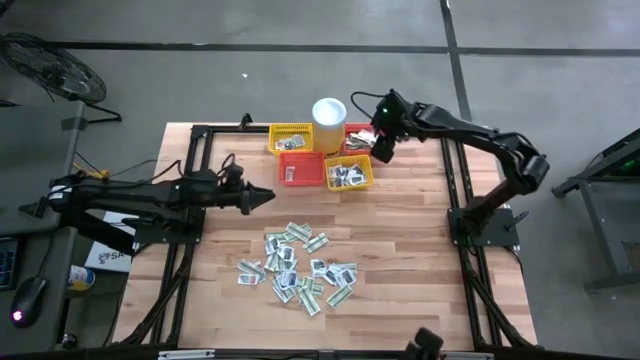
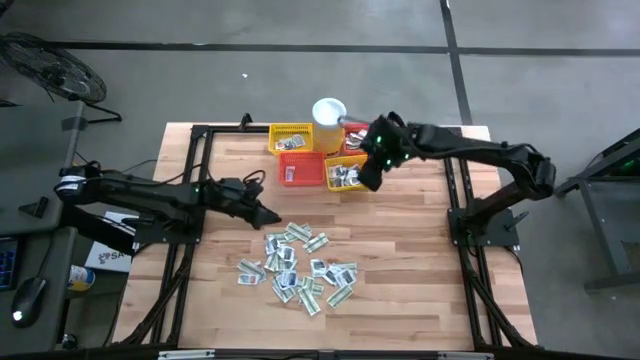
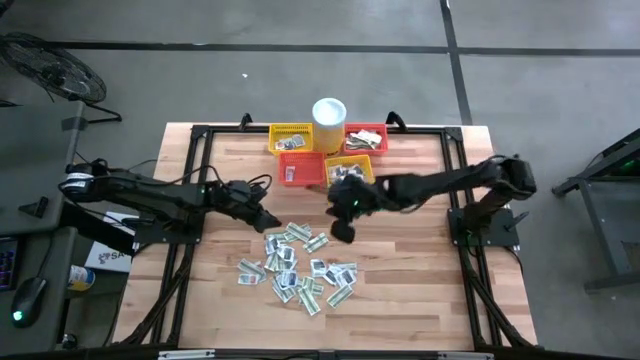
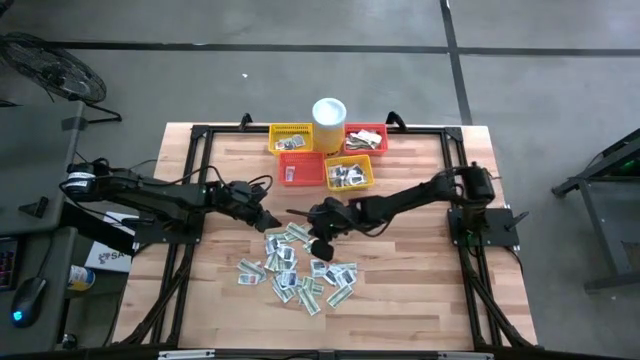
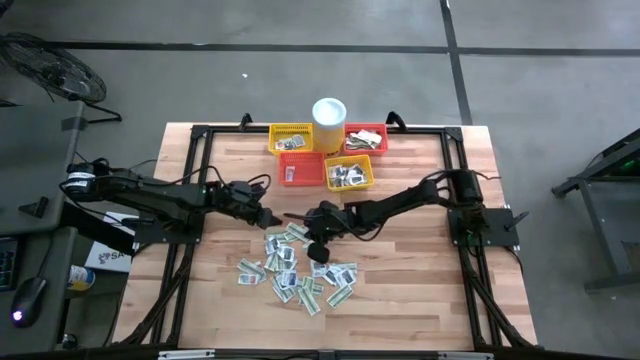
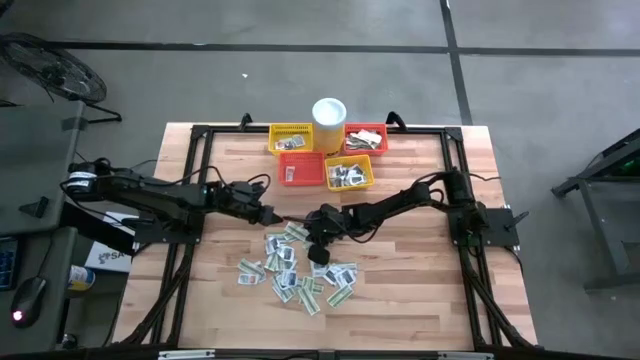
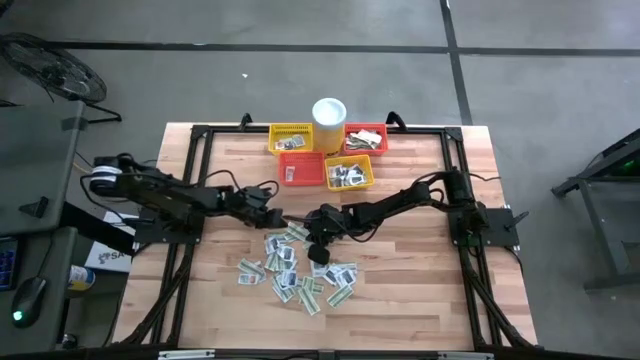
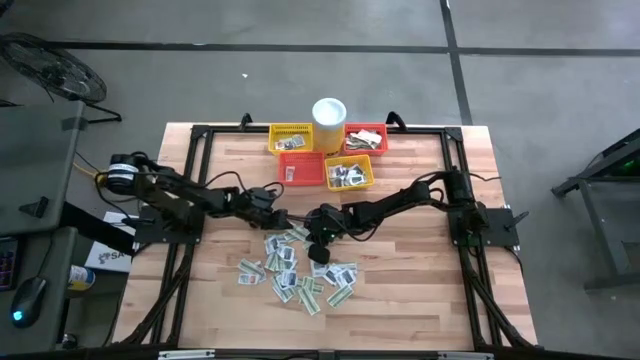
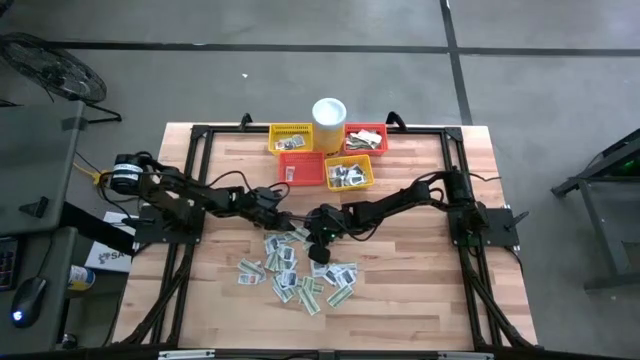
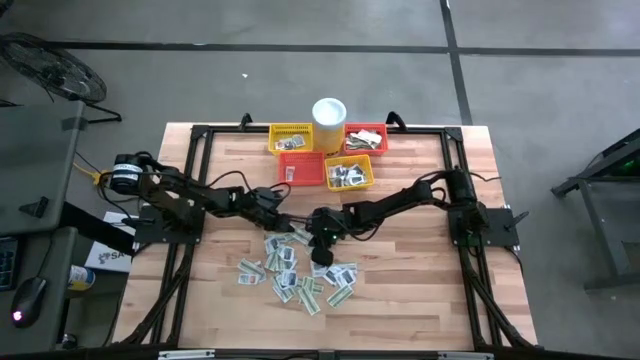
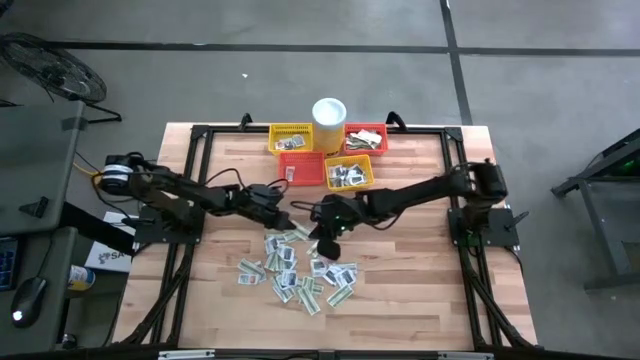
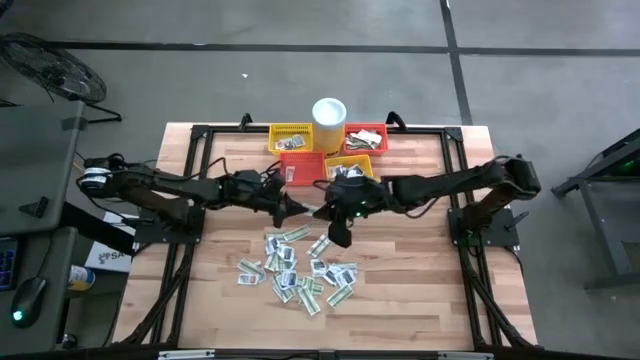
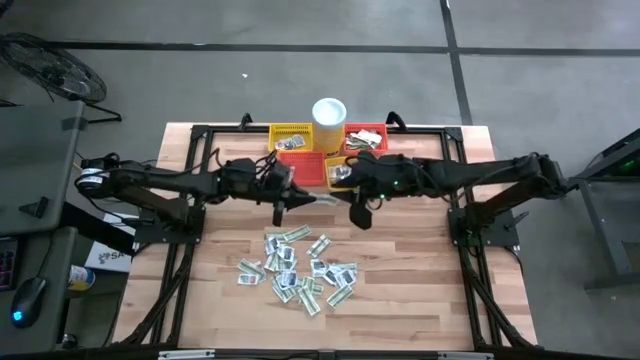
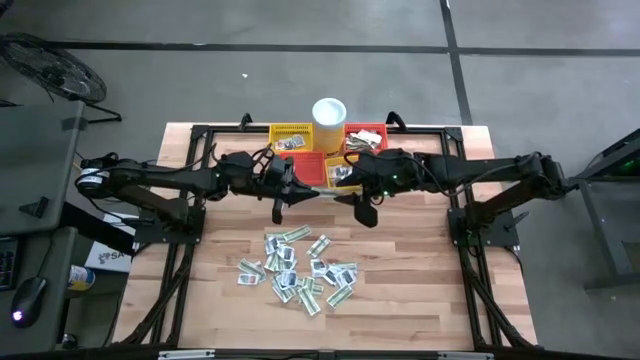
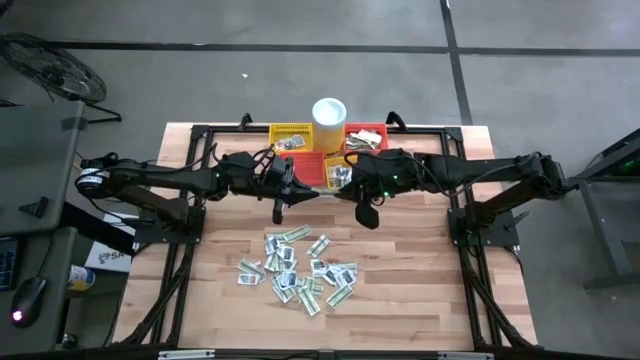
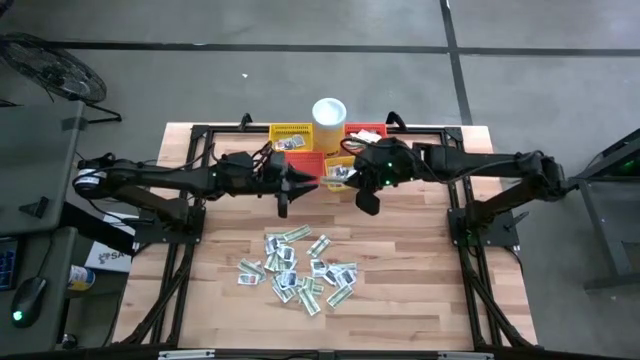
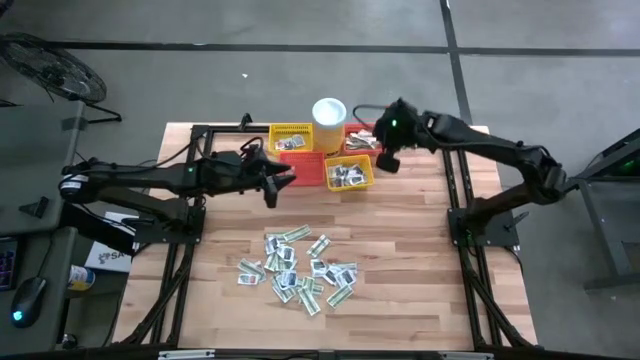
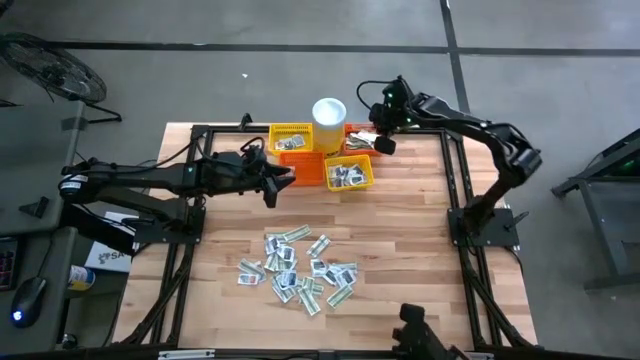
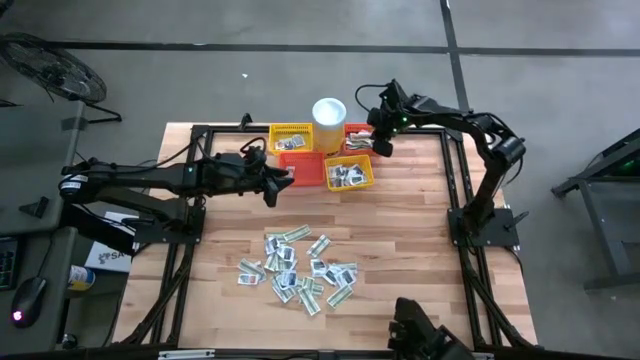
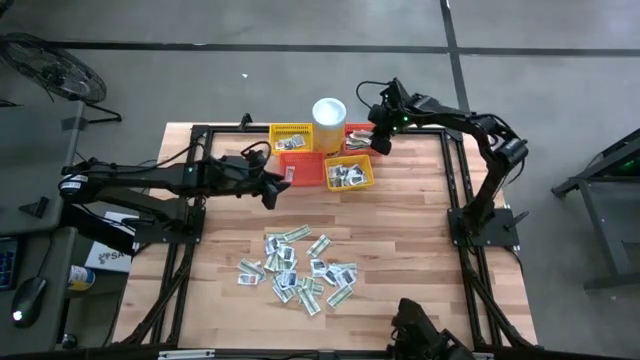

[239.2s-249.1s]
Task: Pick & Place First Aid Supplies
Put the green bandage pack into the top orange basket

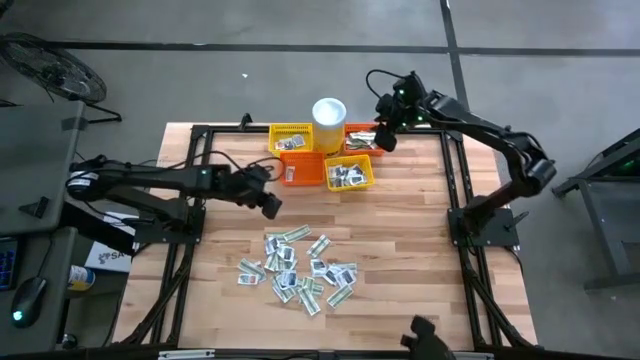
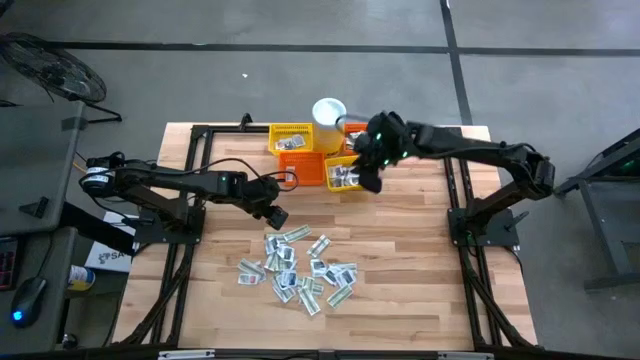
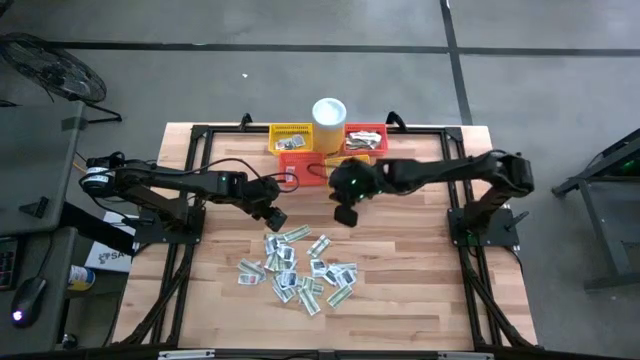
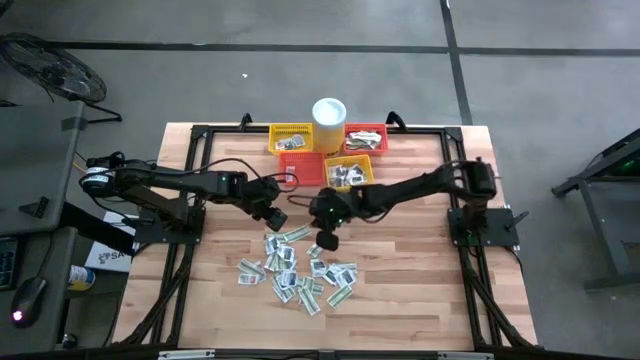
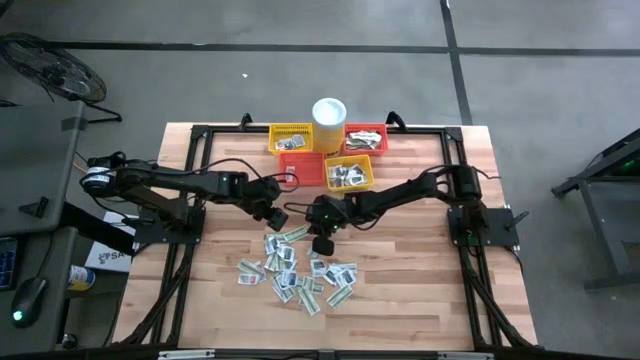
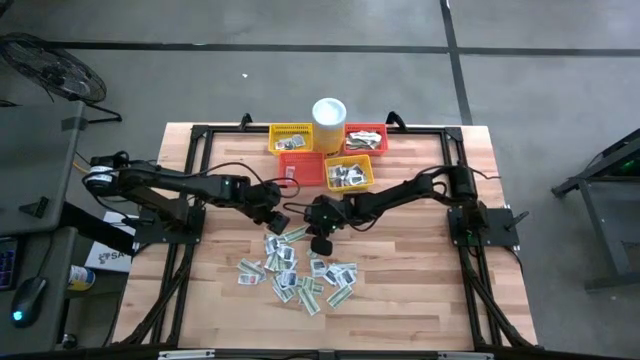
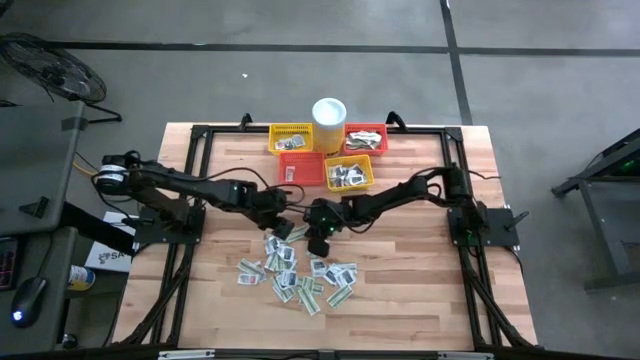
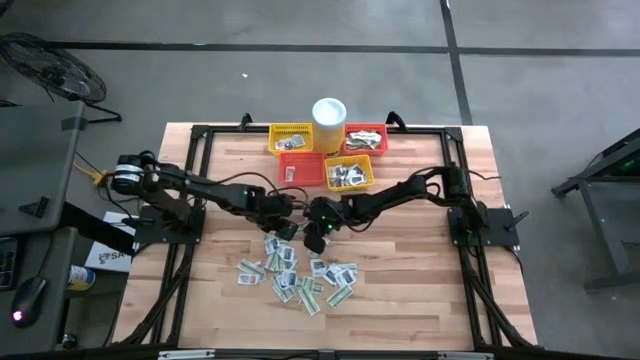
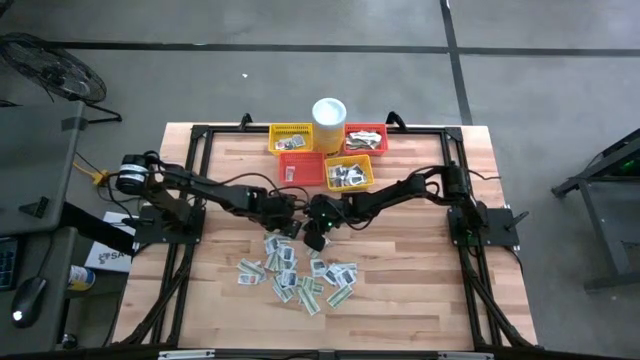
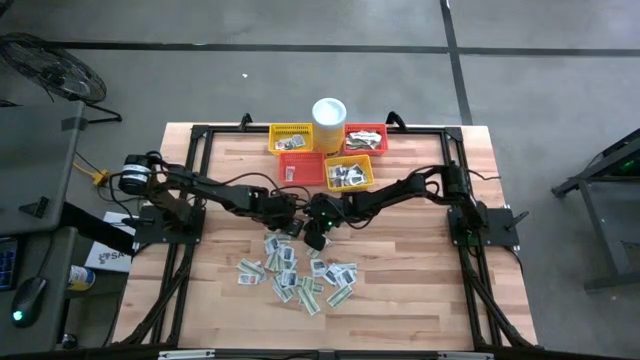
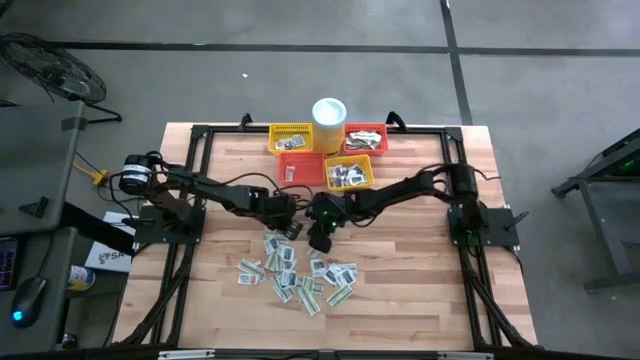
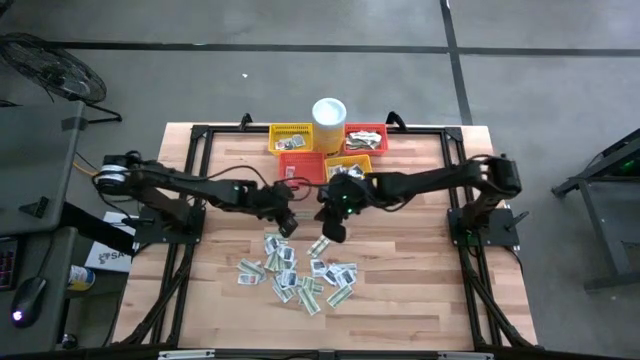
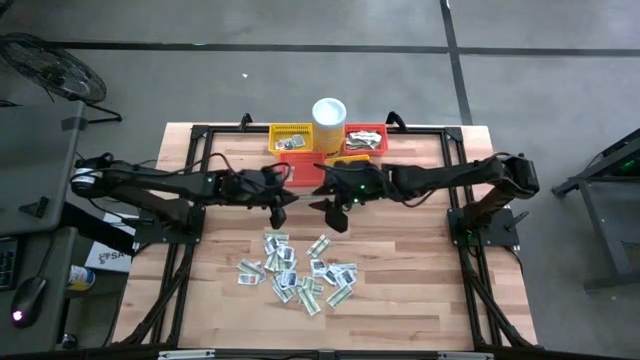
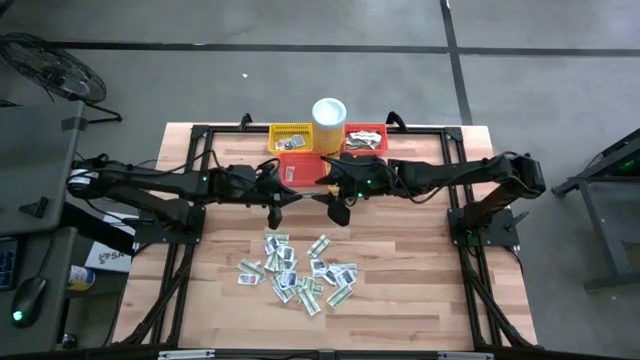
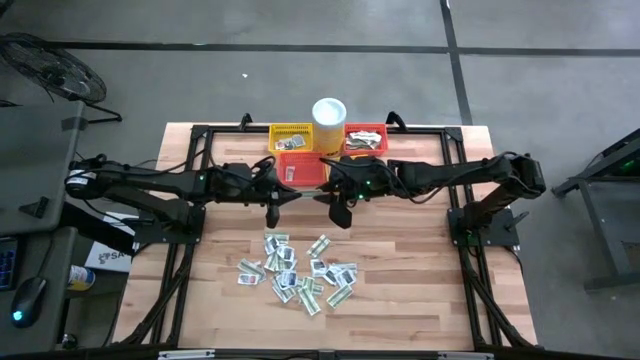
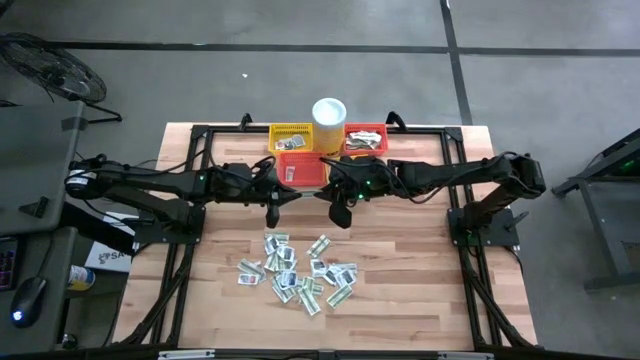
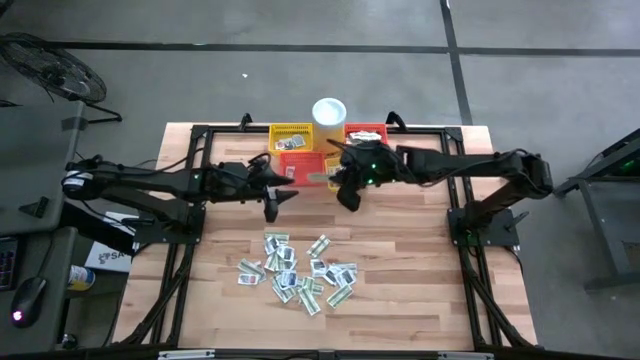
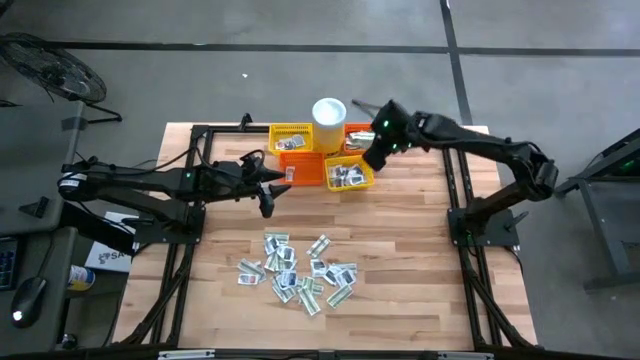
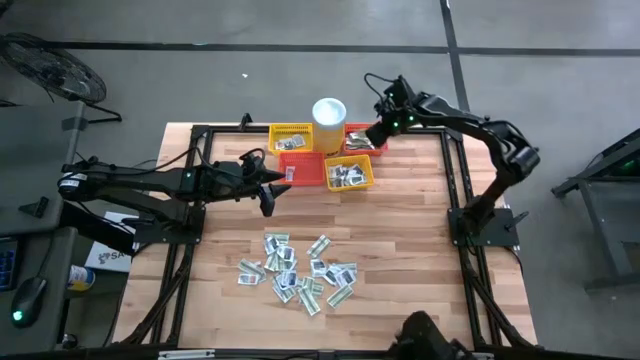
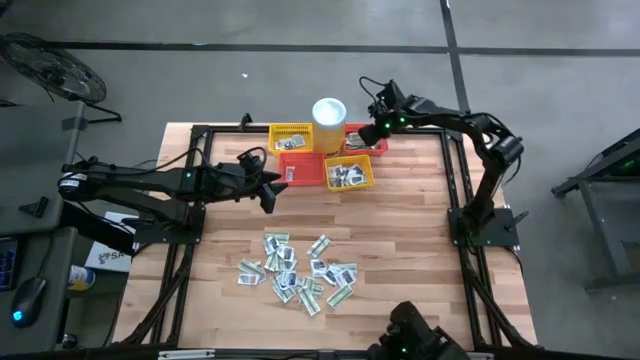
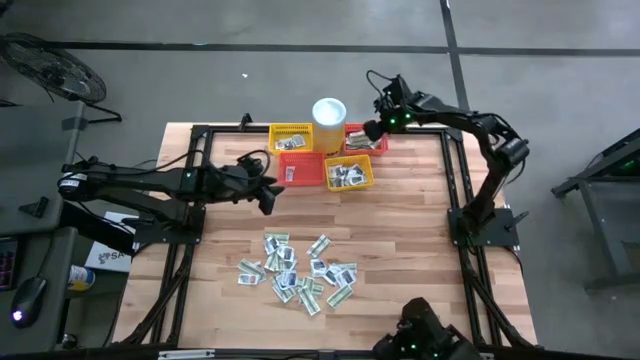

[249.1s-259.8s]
Put the green bandage pack into the top orange basket
